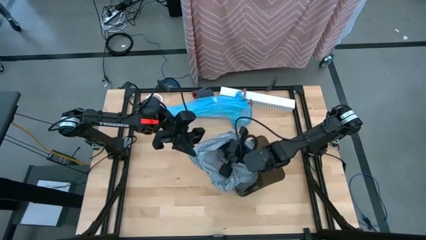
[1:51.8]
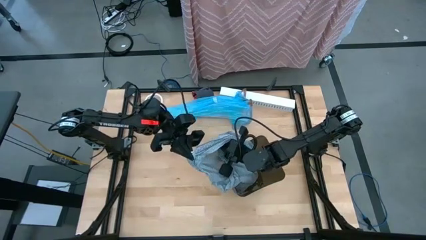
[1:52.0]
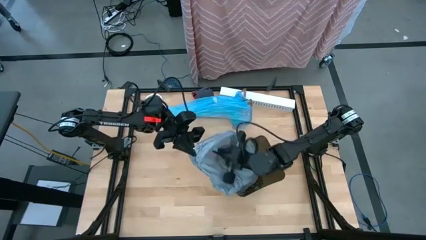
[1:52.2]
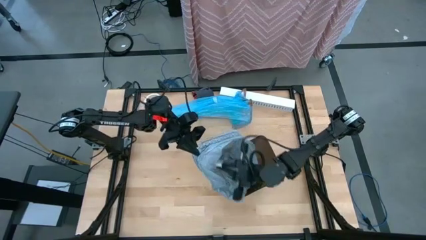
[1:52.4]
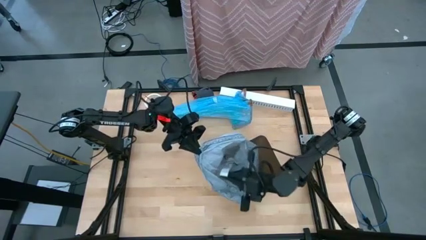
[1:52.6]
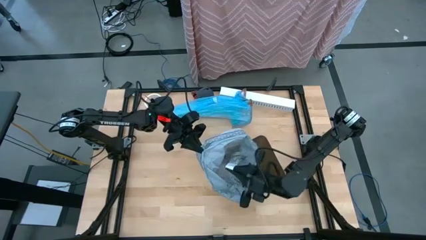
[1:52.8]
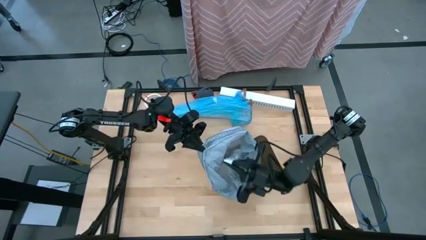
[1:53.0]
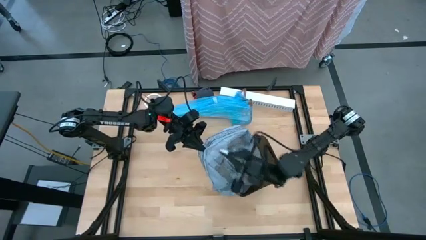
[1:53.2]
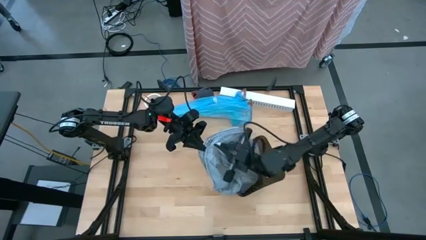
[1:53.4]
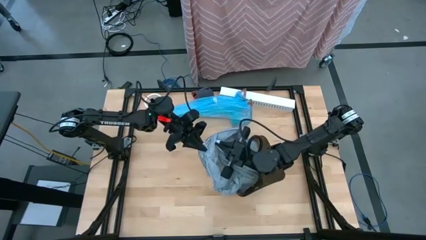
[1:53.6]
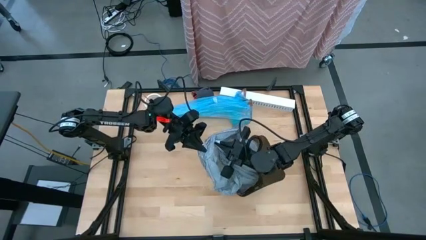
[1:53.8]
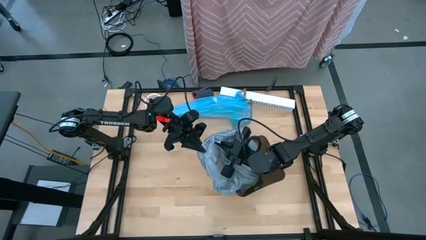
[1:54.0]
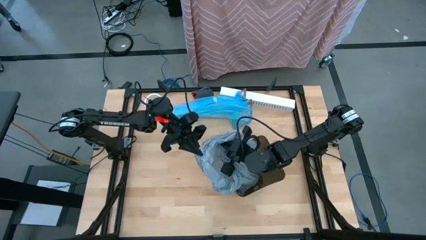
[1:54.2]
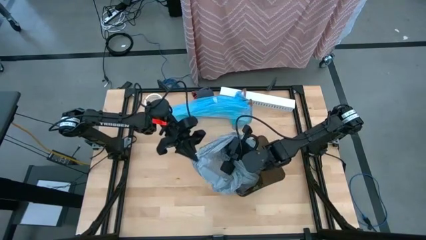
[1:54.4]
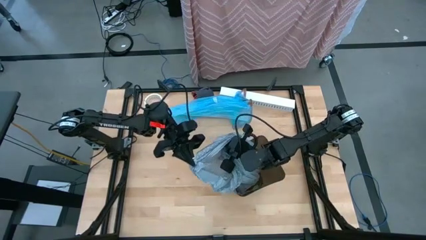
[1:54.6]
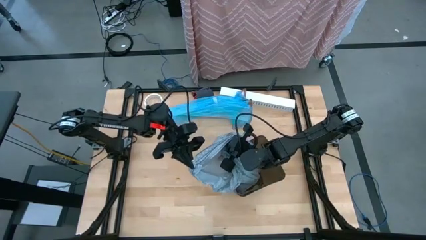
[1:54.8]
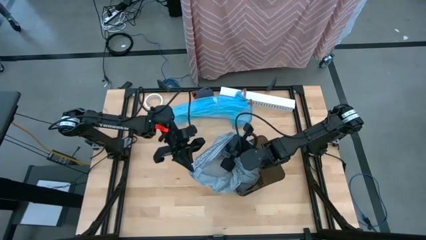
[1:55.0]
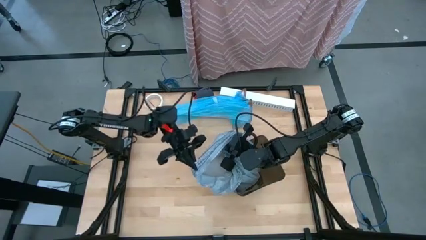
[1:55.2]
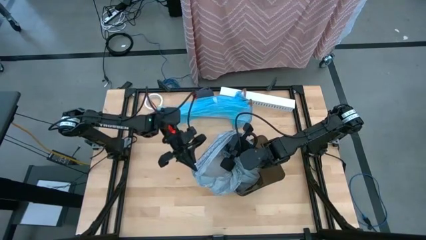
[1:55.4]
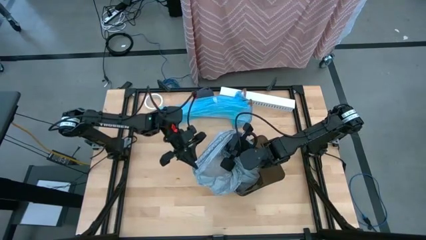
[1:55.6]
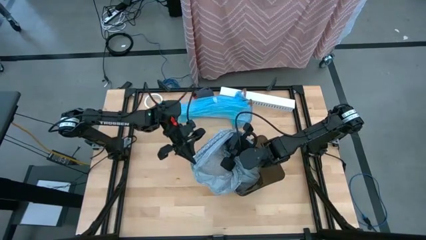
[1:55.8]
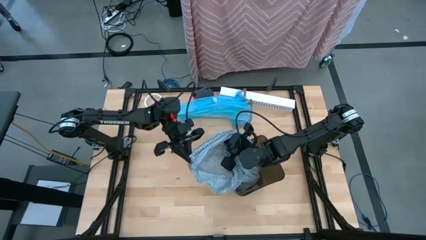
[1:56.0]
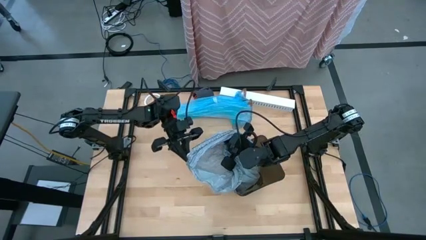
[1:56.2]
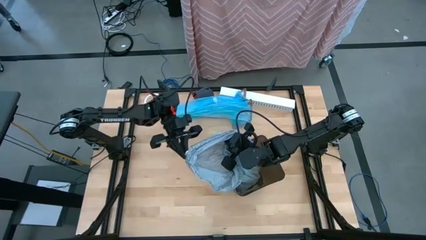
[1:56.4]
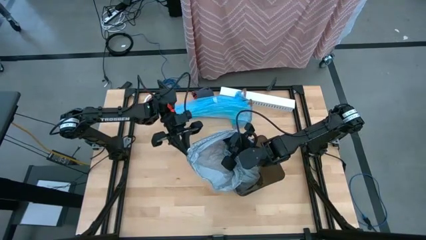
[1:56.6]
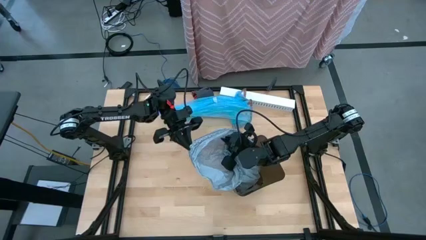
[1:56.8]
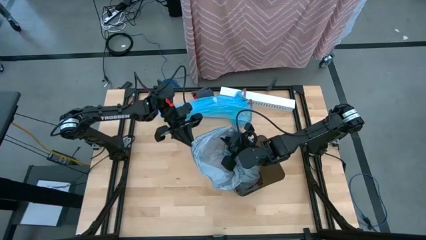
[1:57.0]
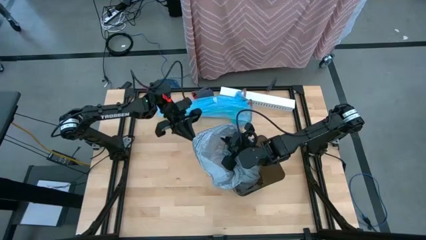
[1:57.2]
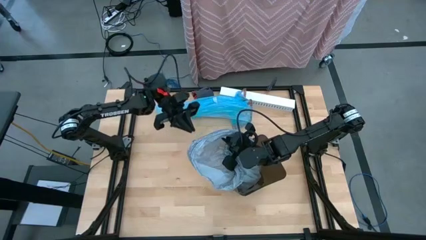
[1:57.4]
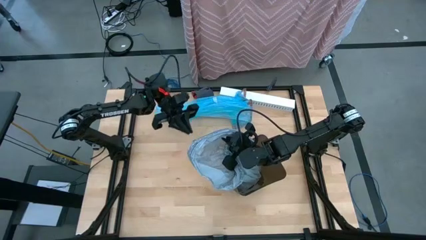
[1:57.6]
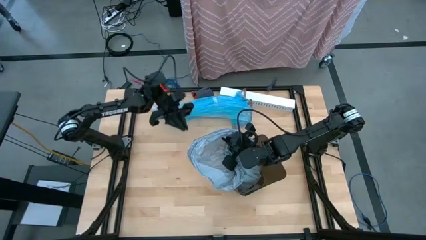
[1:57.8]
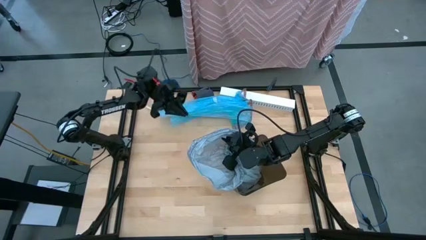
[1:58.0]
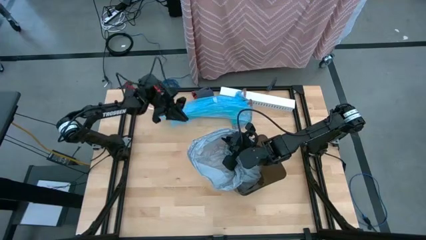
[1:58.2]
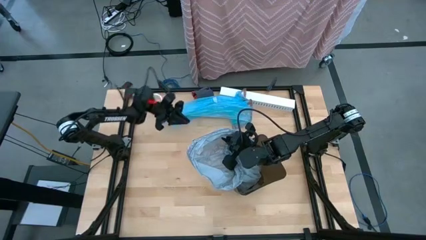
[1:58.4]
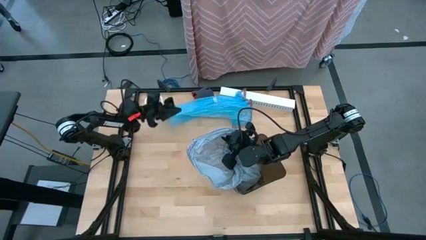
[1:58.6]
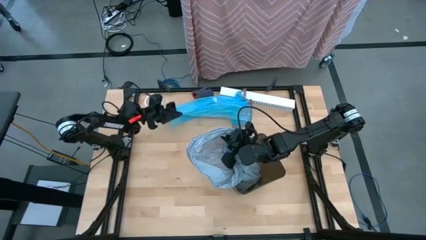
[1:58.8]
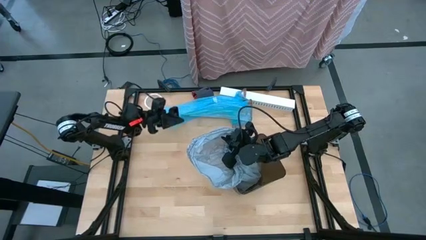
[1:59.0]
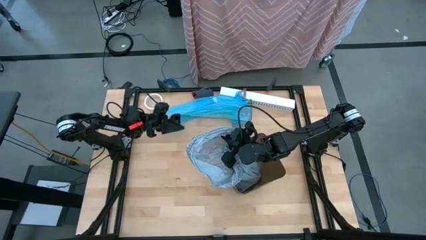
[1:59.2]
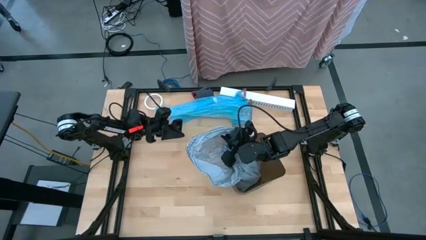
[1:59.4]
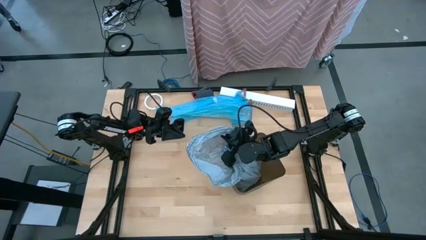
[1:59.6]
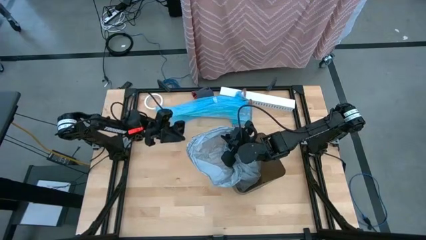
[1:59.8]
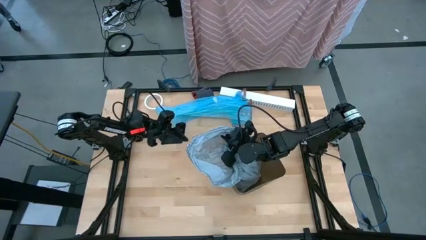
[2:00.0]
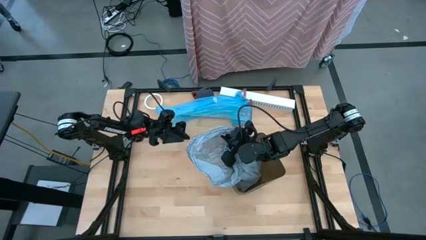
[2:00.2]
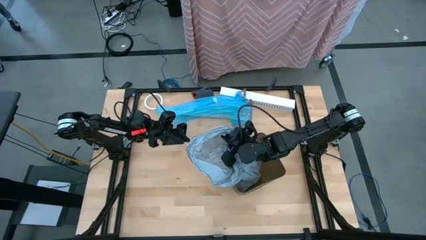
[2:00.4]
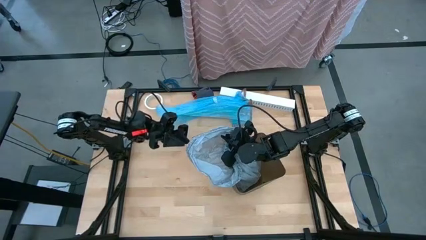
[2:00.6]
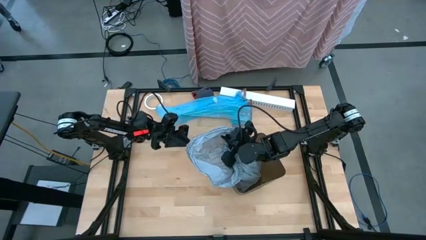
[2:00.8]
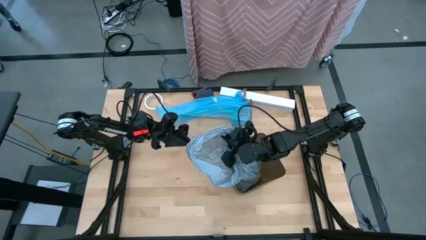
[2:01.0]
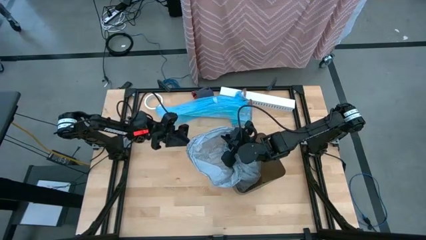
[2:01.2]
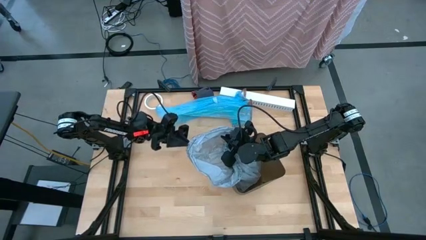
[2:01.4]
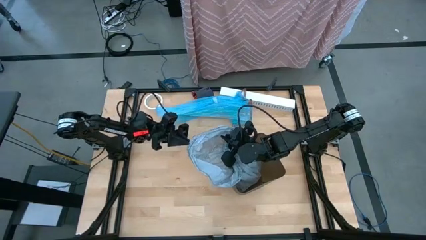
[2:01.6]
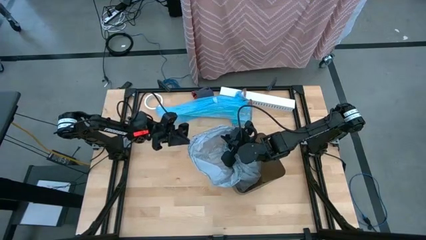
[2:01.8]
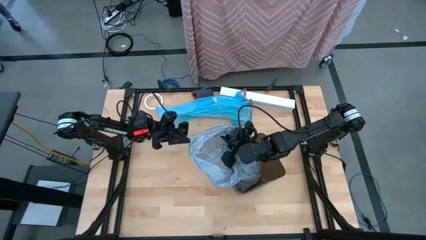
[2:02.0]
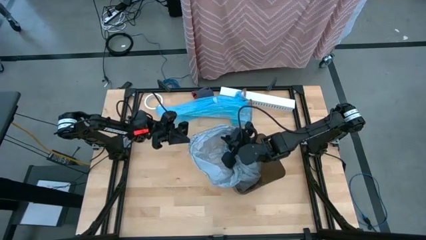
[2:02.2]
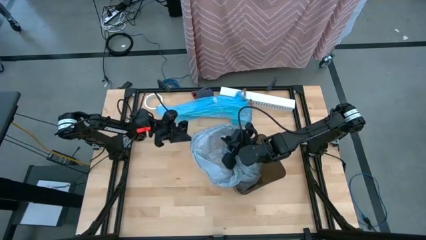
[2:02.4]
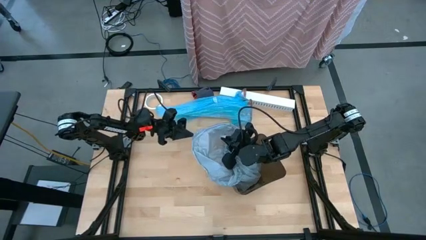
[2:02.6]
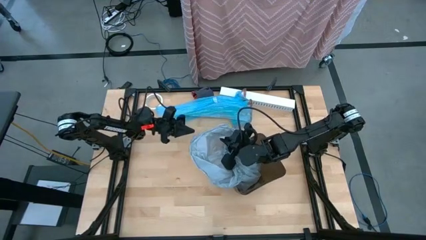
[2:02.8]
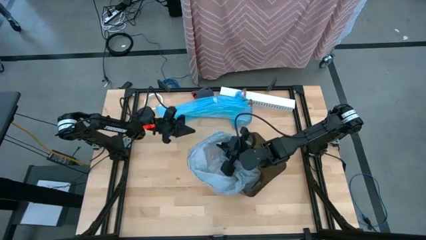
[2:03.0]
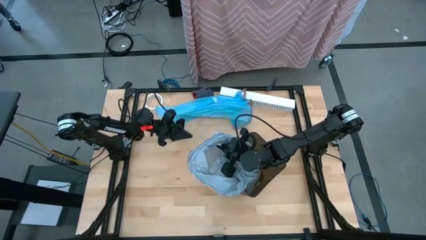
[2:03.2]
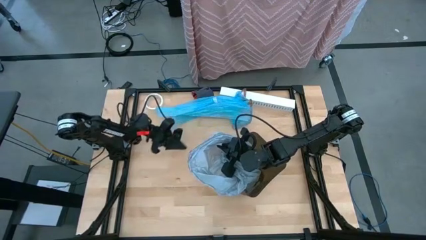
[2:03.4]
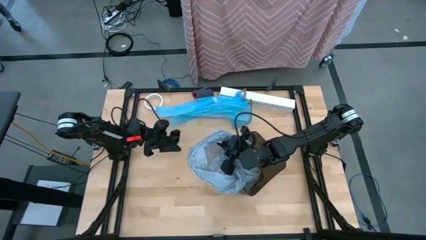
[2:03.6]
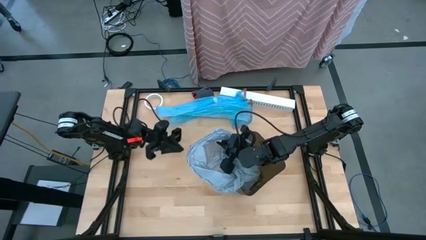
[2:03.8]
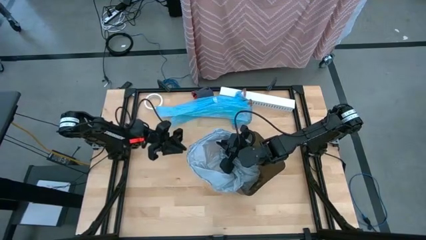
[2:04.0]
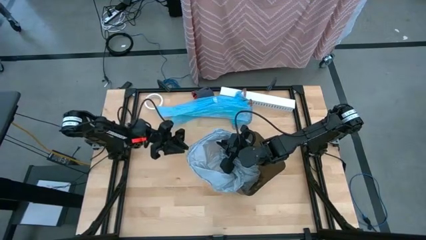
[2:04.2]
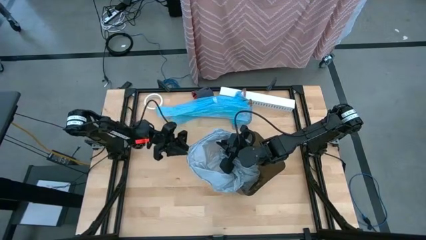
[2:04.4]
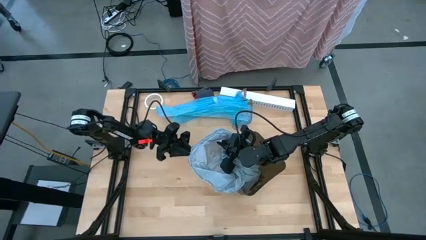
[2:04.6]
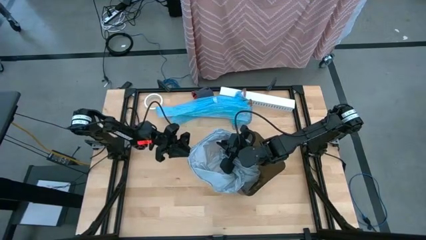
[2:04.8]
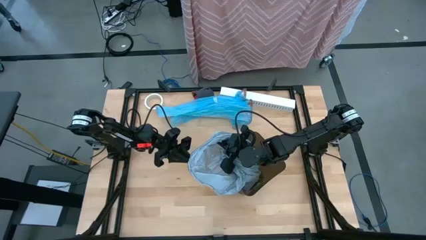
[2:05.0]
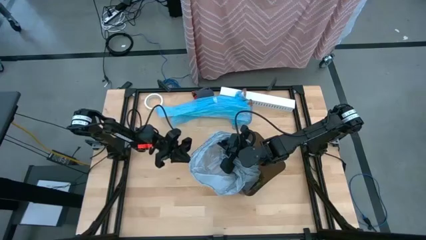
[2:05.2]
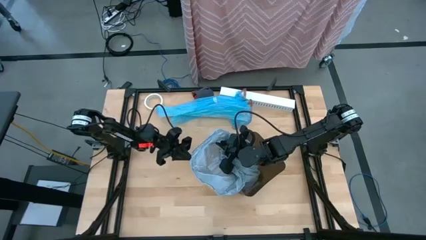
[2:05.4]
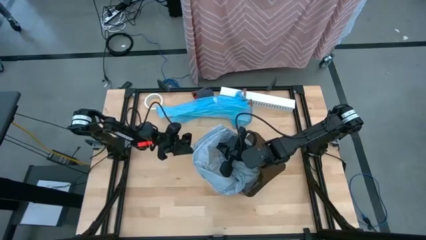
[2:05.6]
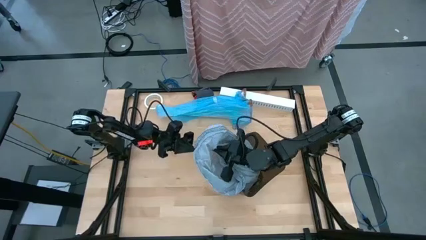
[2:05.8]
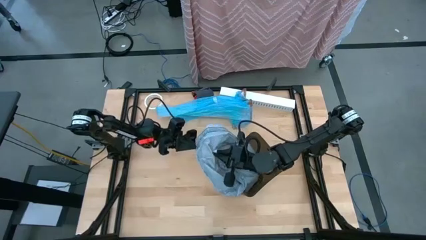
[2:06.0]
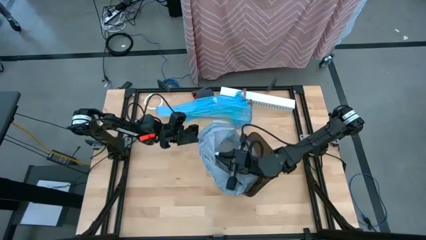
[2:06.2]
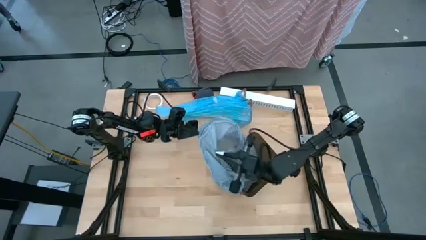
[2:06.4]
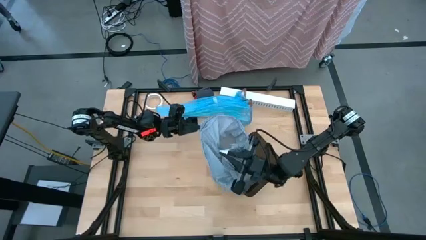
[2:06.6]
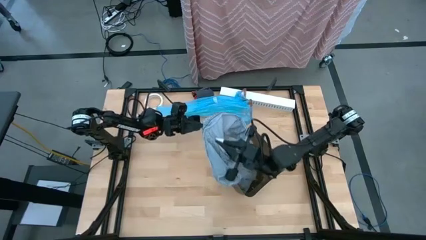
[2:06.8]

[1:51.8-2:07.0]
Task: place trash/remove bag and relplace
Remove the blue trash bag from the black trash bin using the drawstring
